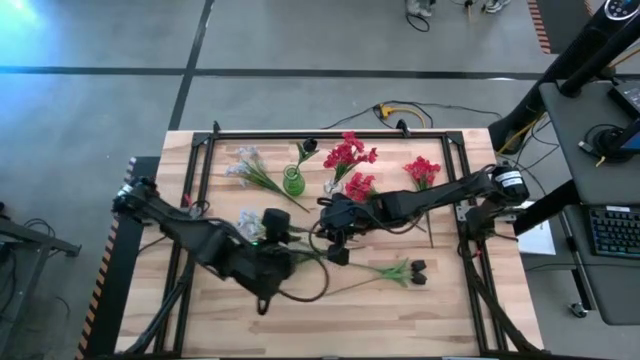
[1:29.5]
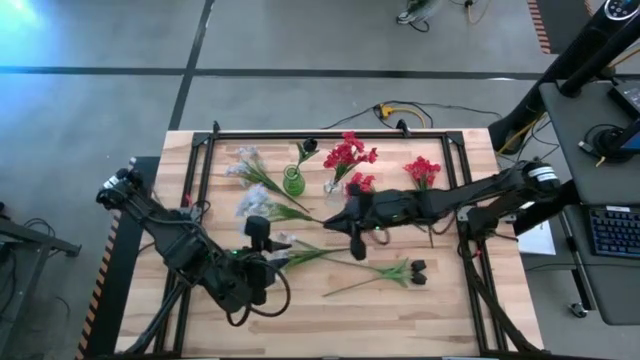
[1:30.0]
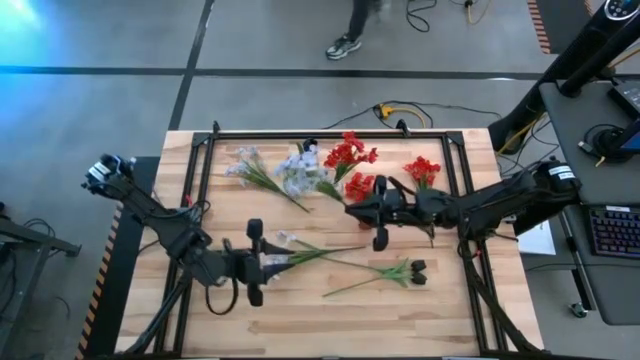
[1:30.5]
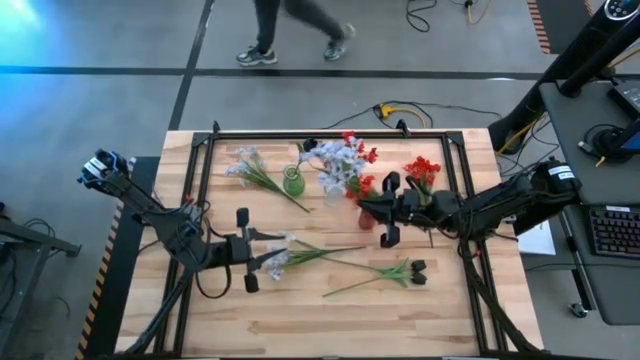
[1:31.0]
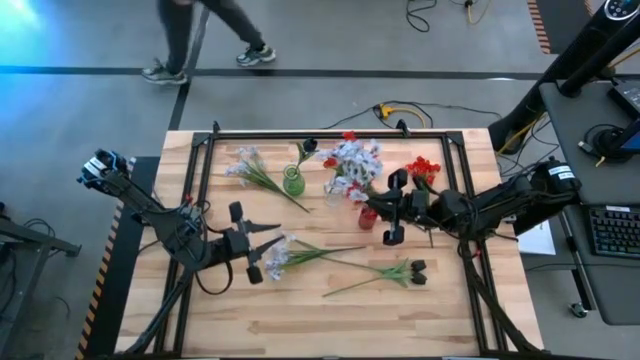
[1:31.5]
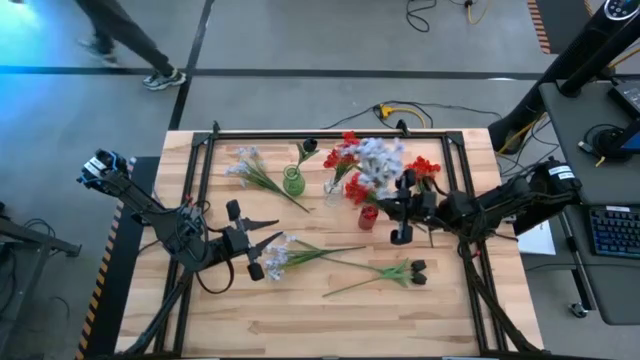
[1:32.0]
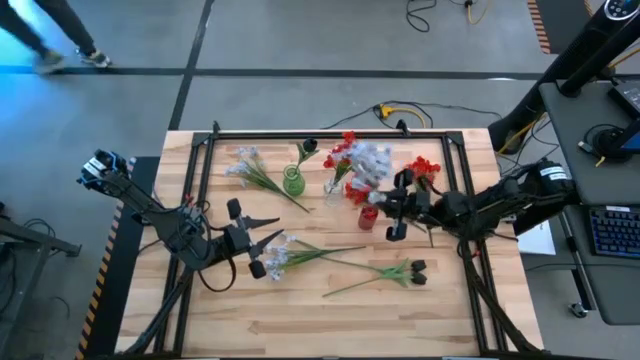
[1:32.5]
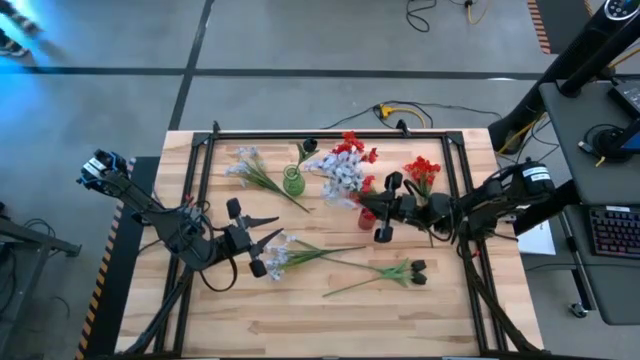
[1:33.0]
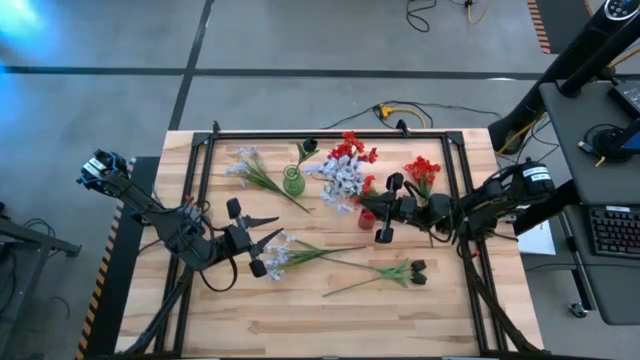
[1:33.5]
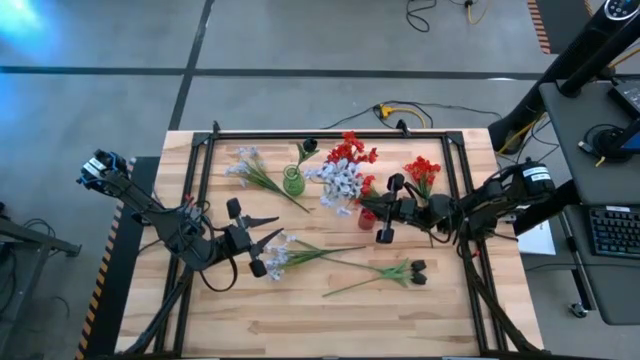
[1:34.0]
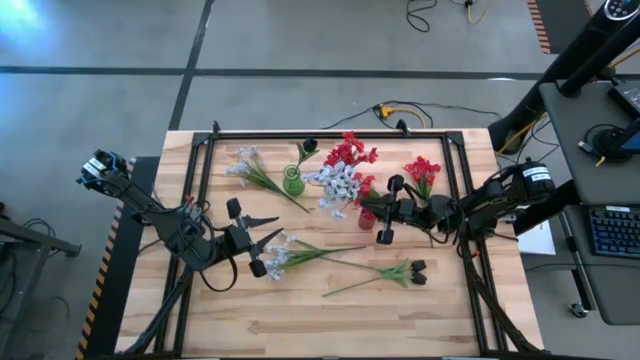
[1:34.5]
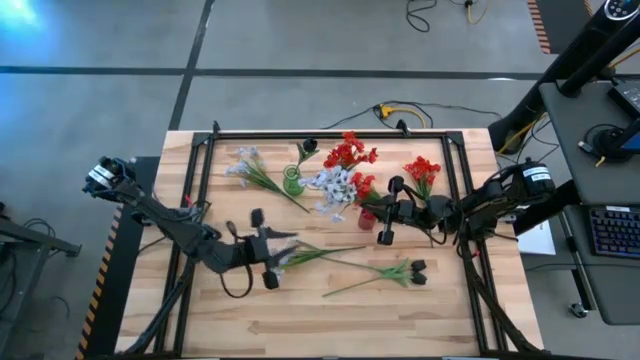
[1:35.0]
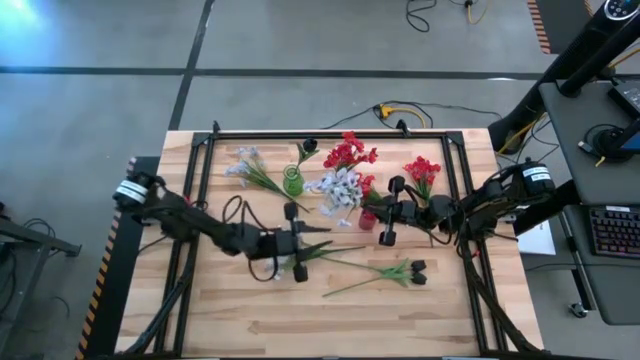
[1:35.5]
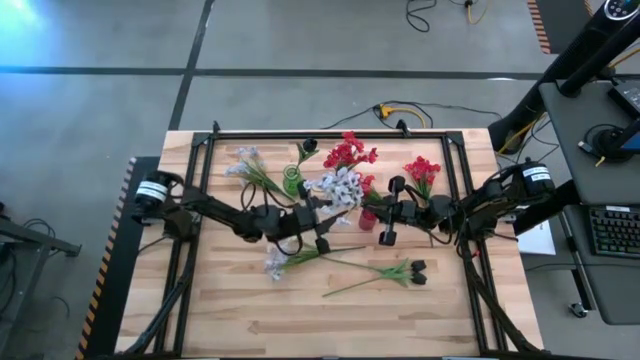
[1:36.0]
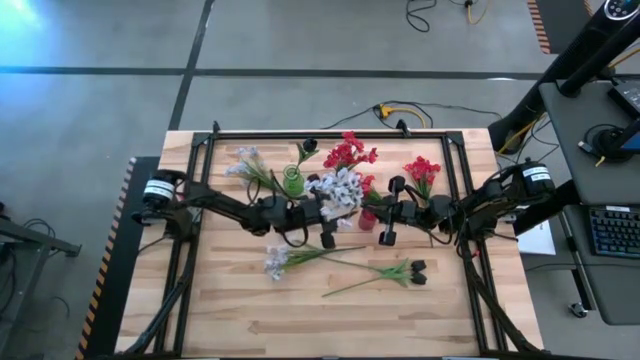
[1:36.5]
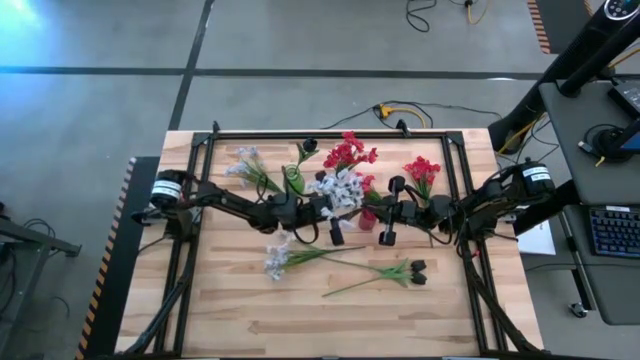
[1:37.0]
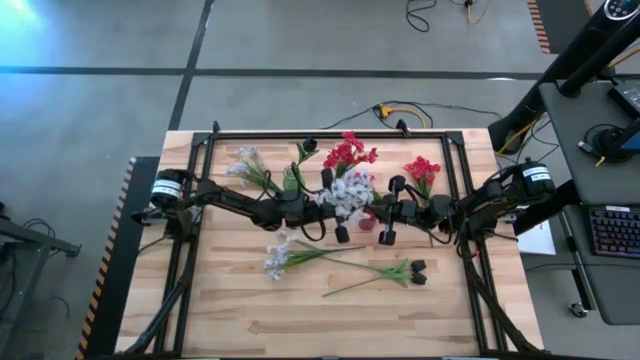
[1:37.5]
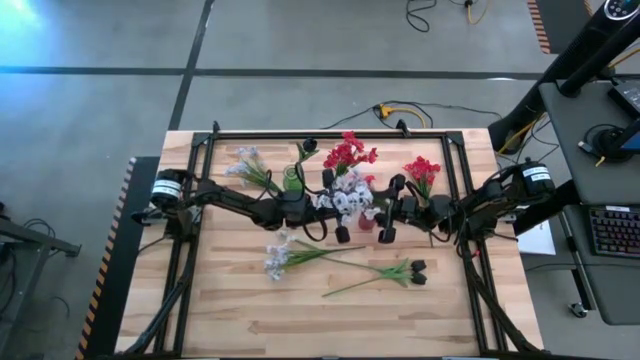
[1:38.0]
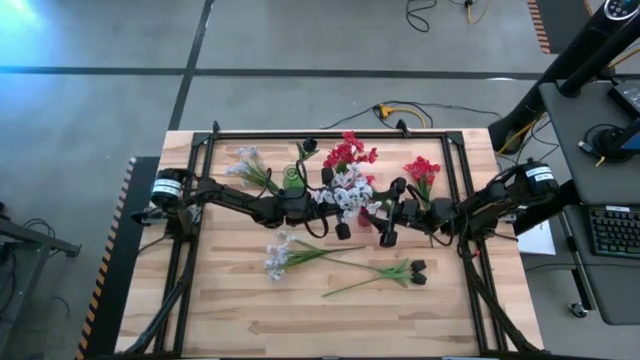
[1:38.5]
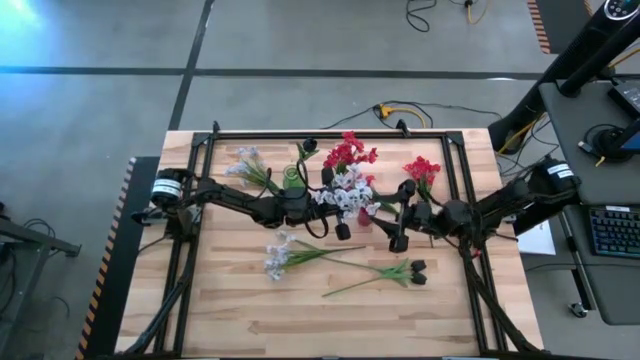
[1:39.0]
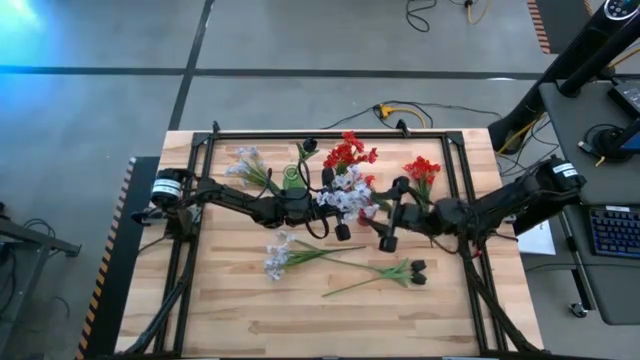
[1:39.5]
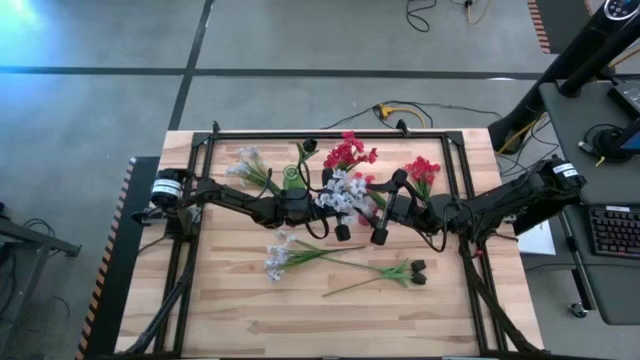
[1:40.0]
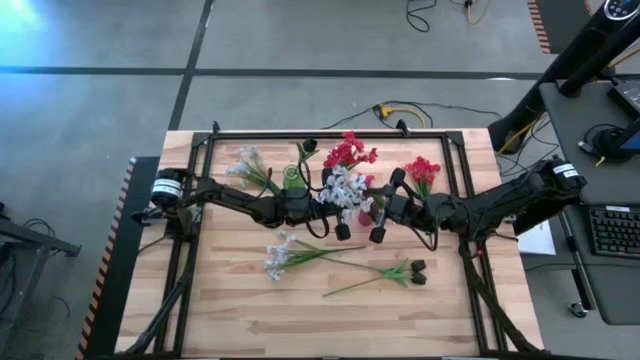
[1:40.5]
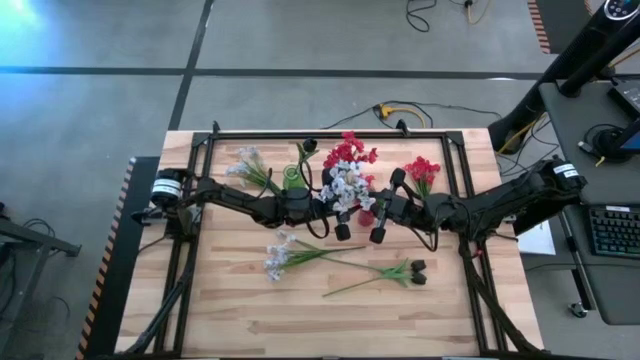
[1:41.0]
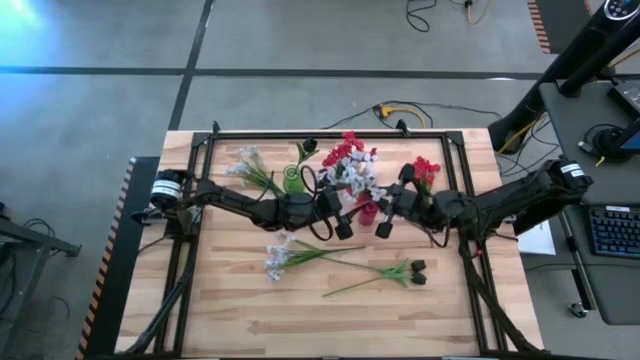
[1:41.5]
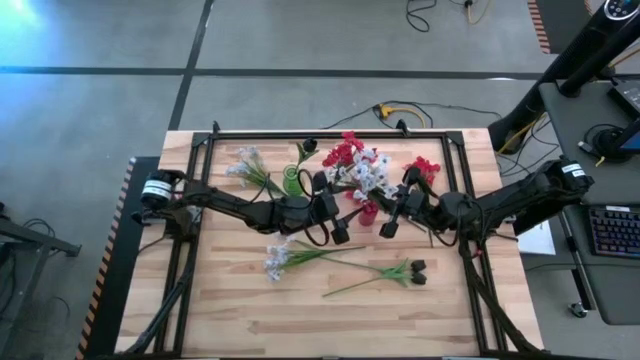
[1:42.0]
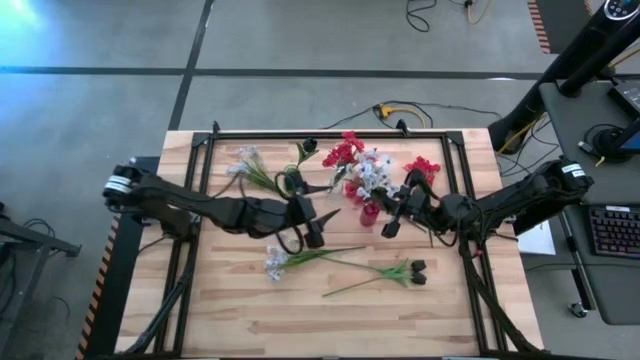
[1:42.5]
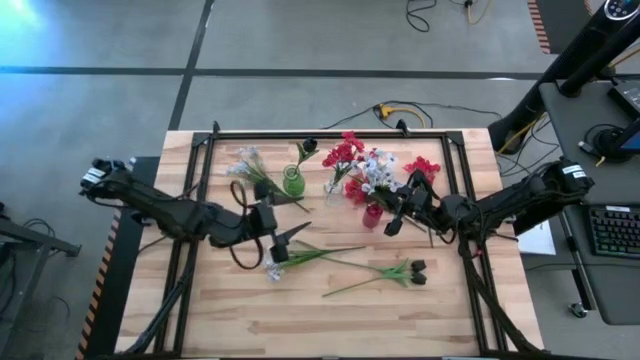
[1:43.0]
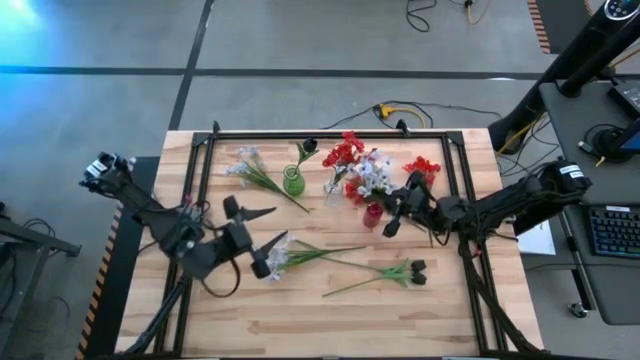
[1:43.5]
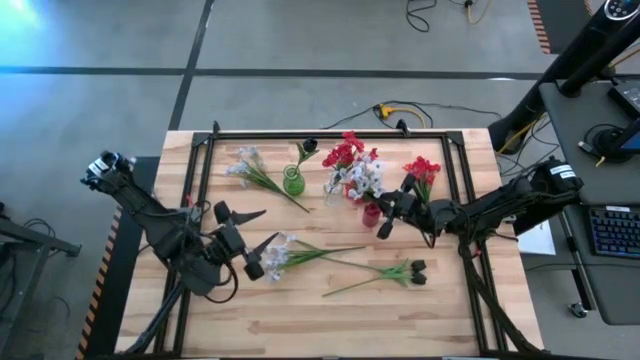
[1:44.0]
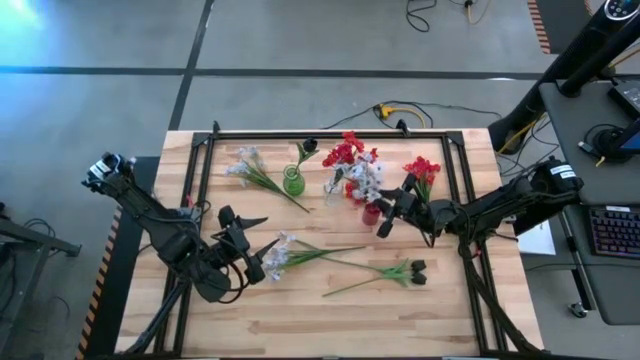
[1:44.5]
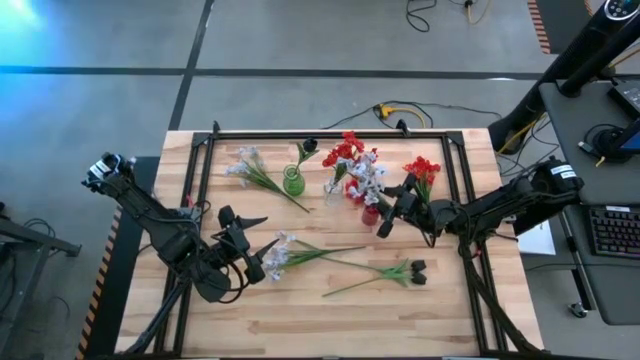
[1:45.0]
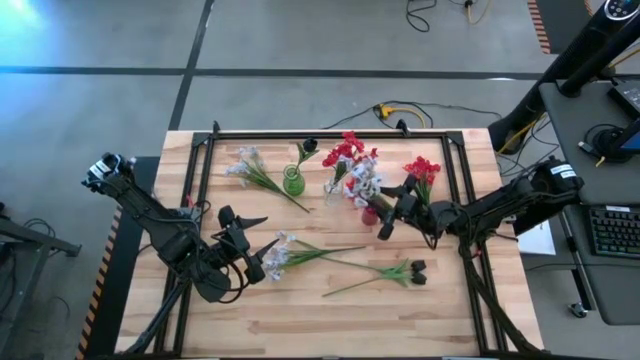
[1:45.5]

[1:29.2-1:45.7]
Task: Sort flowers into vase by color
Put the middle left white flowers into the red vase

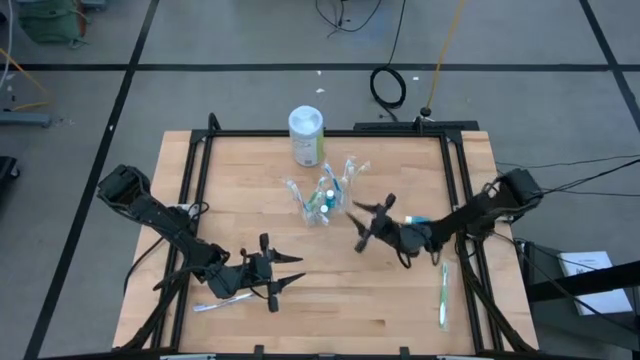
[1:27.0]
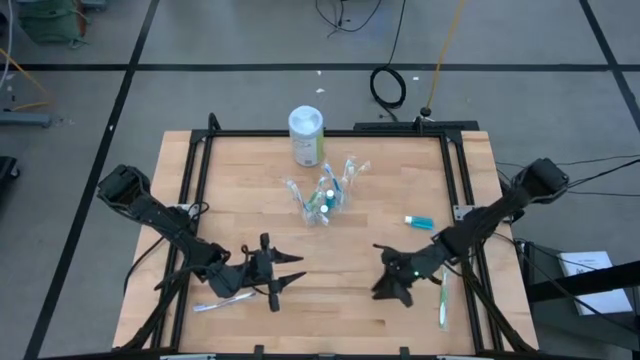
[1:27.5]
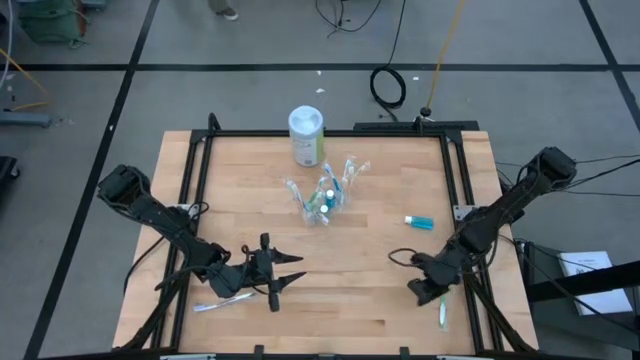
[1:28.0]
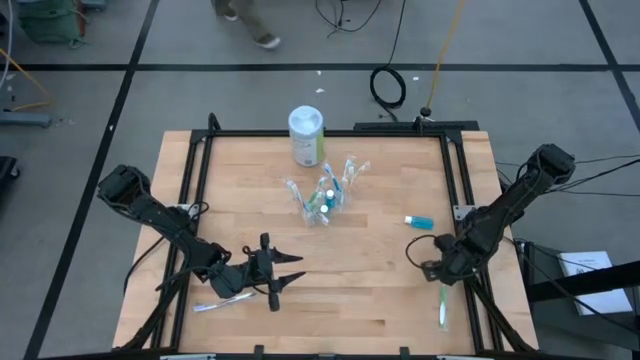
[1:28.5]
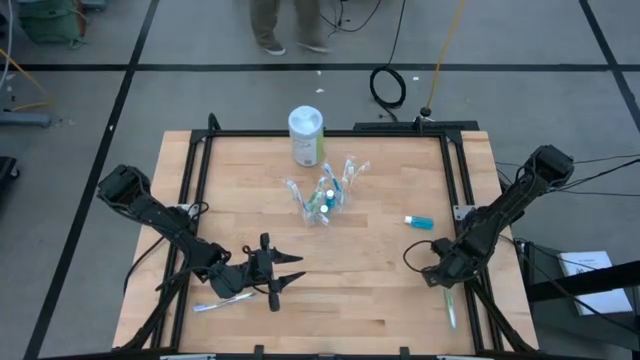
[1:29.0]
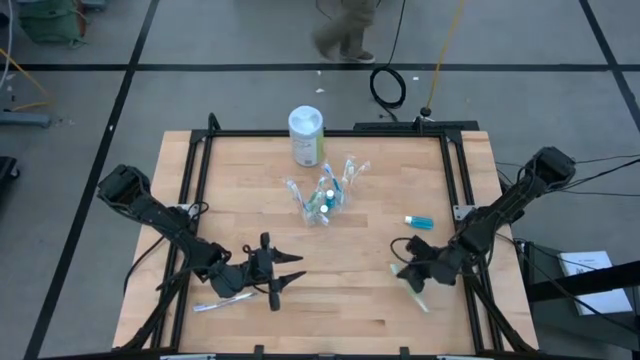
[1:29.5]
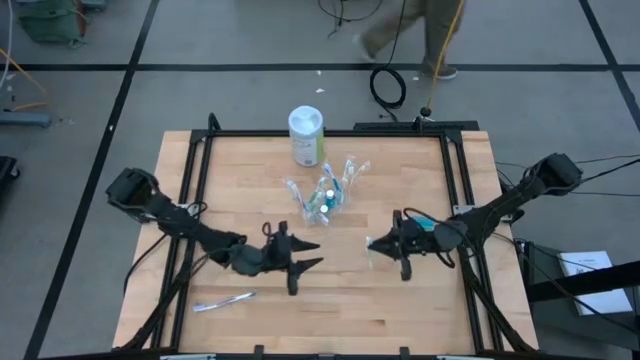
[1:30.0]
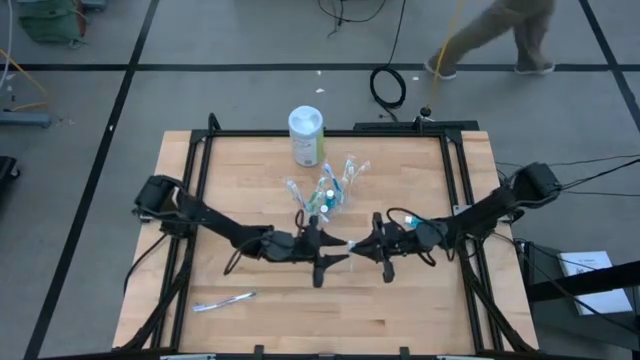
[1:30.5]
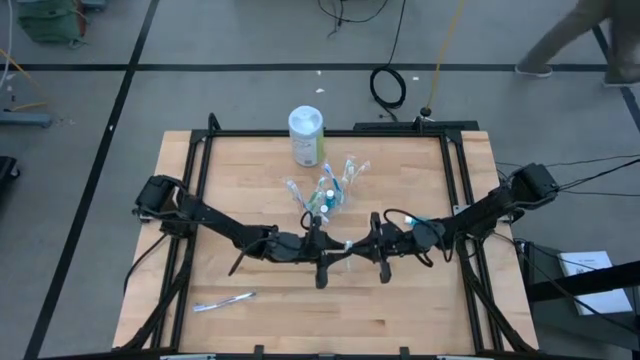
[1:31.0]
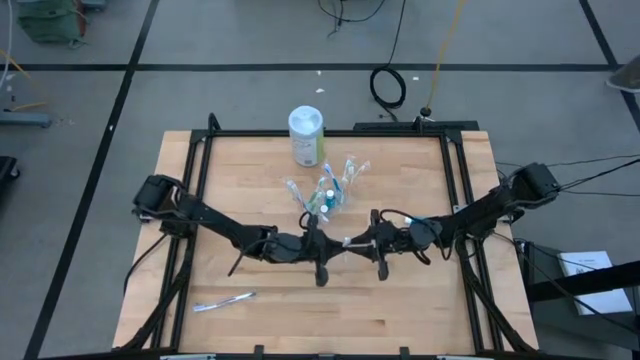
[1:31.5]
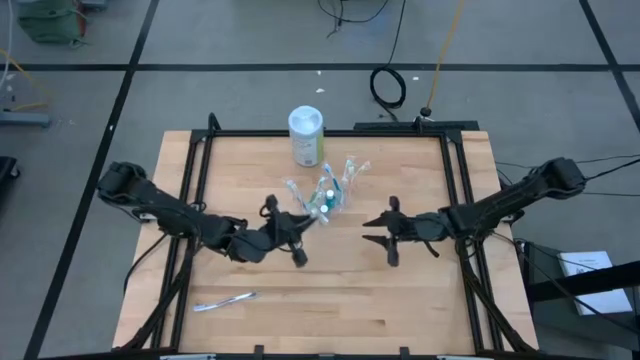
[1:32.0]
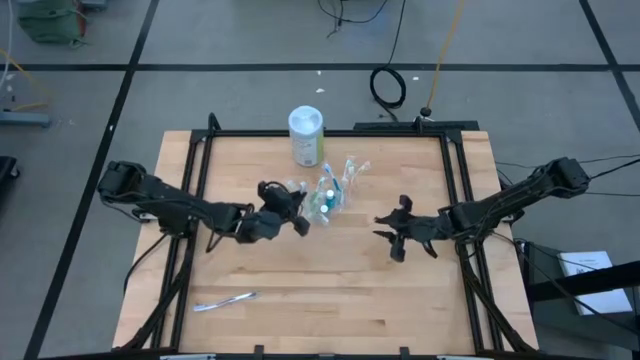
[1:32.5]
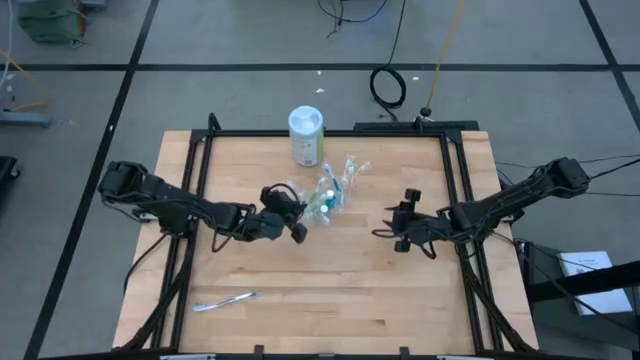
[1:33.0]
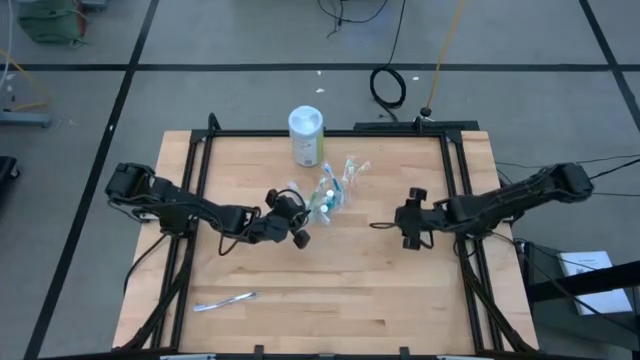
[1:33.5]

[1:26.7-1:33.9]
Task: Pick & Place toothbrushing station
Put the green toothbrush into the transparent organizer
